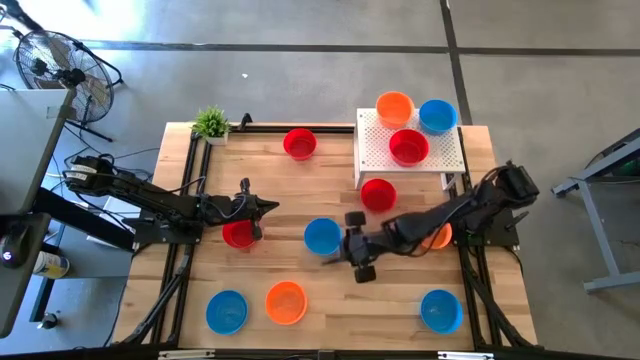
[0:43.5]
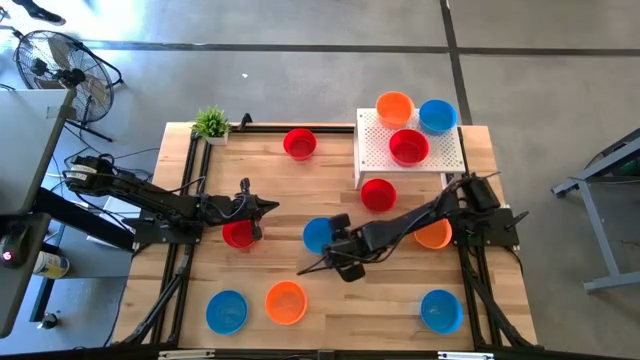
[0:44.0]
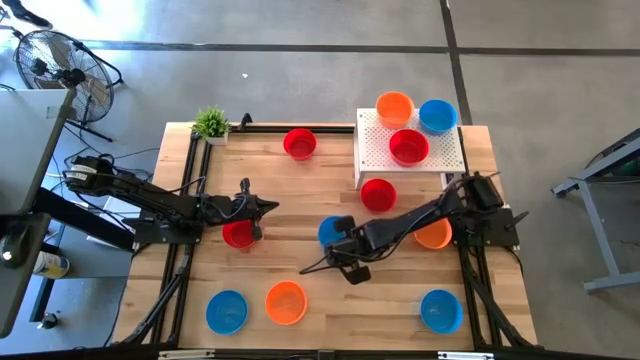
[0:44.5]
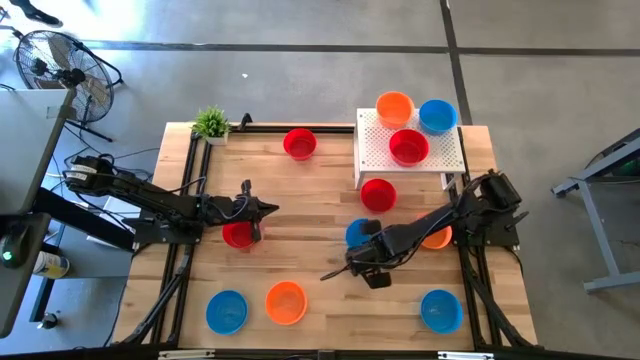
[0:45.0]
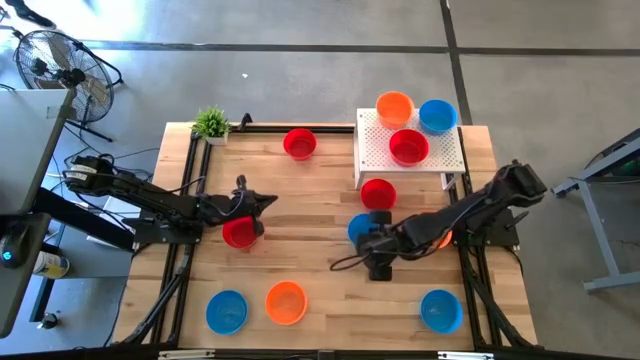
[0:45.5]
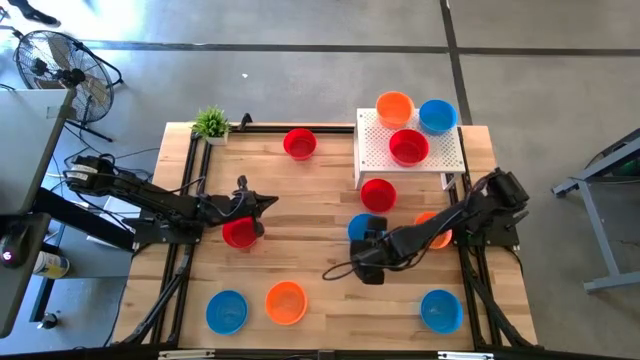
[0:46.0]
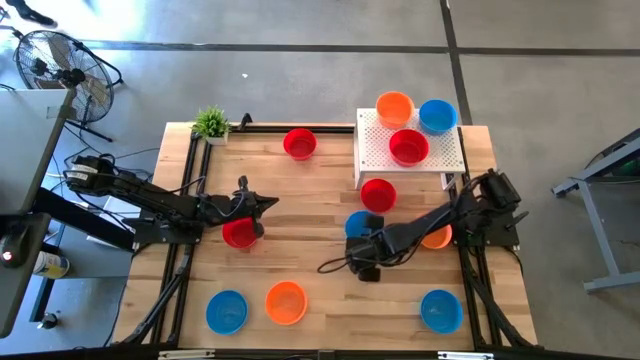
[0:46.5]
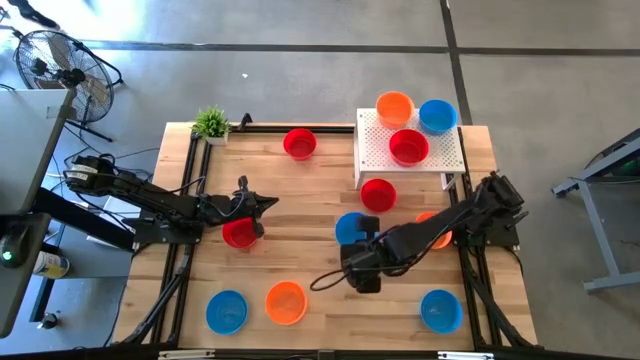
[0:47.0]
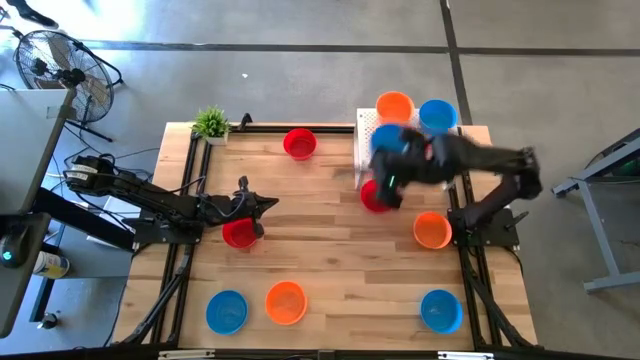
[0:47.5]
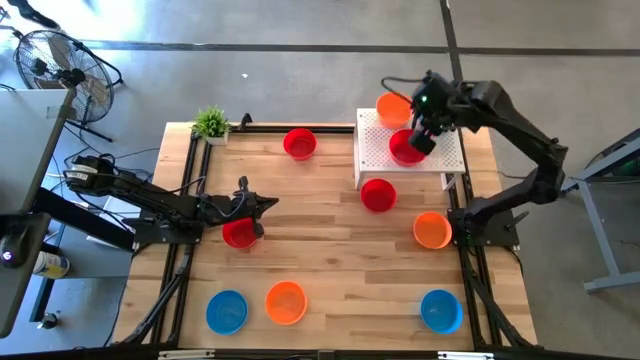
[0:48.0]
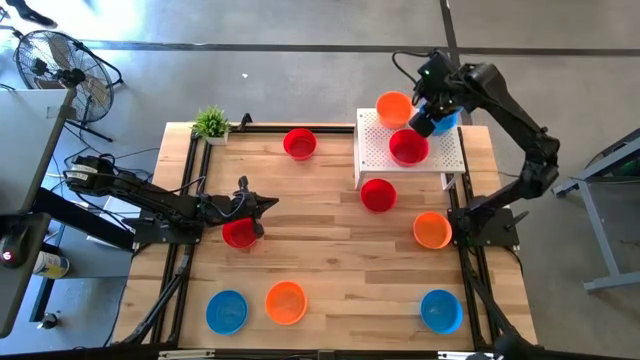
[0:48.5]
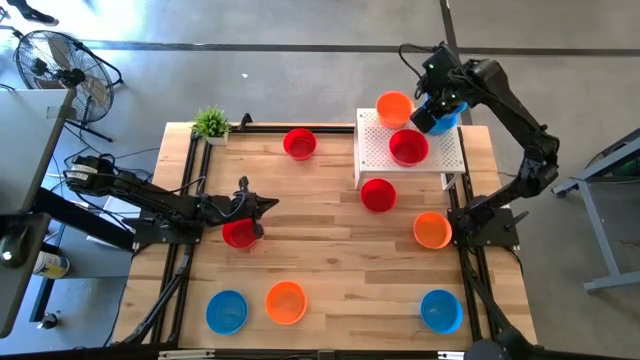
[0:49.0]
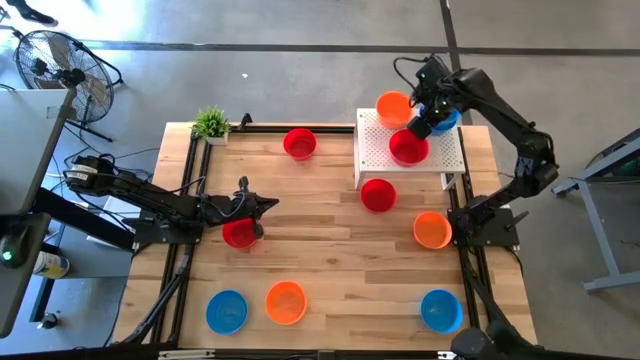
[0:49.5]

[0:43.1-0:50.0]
Task: Pick & Place Mini bowls
Stack the blue bowl on top of the blue bowl on the shelf

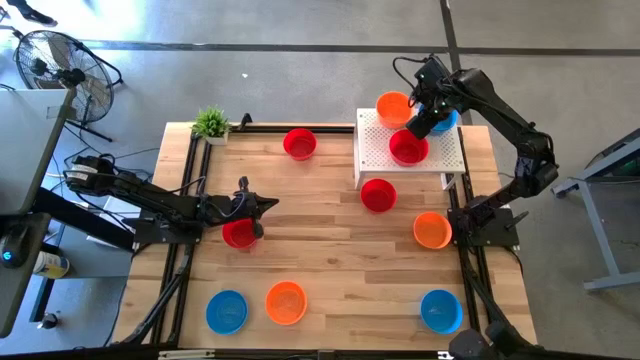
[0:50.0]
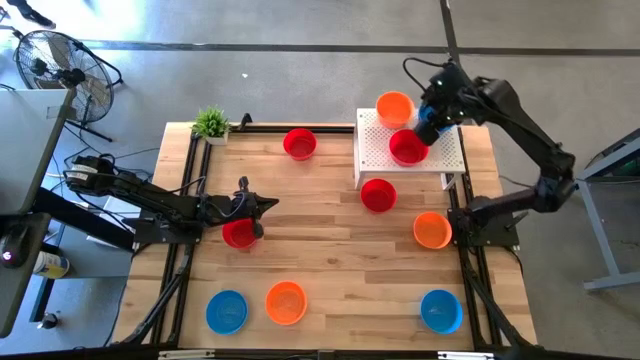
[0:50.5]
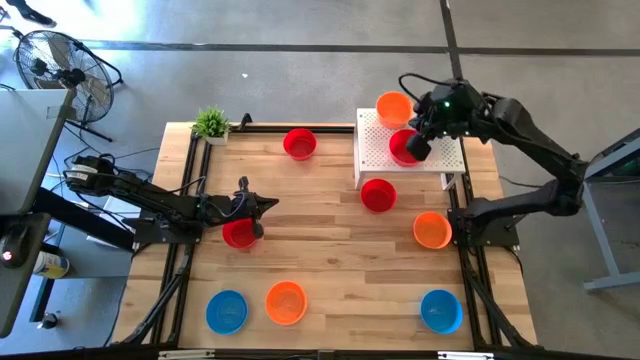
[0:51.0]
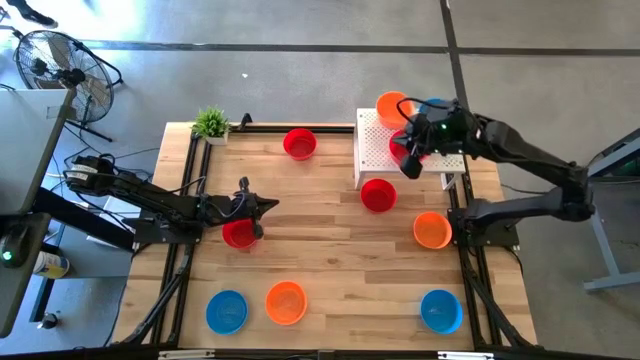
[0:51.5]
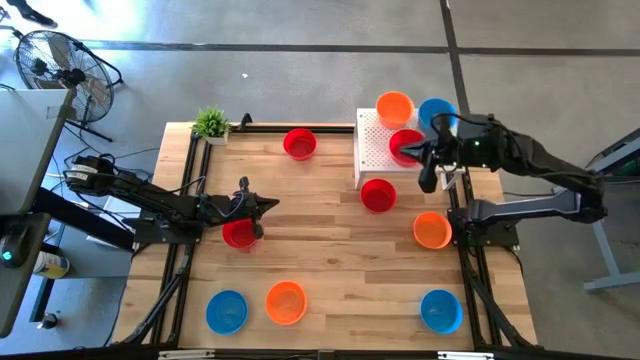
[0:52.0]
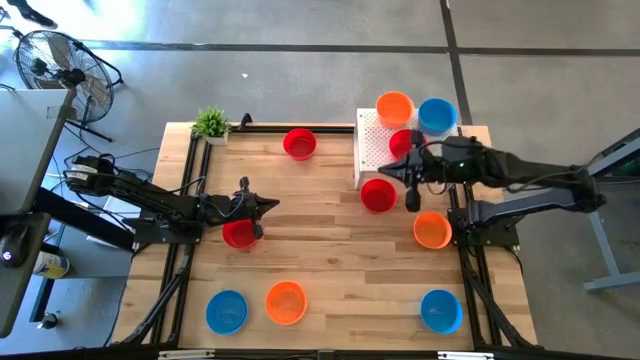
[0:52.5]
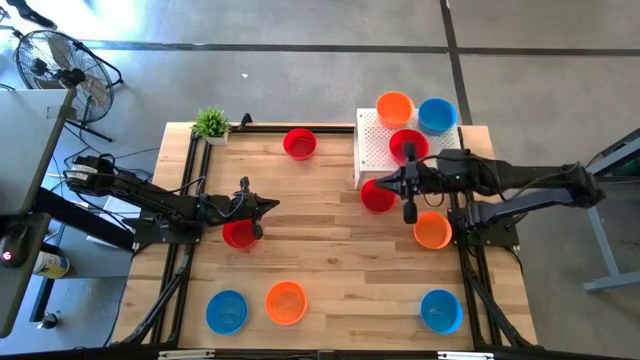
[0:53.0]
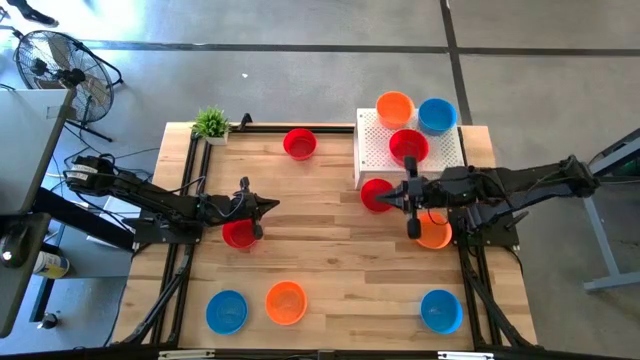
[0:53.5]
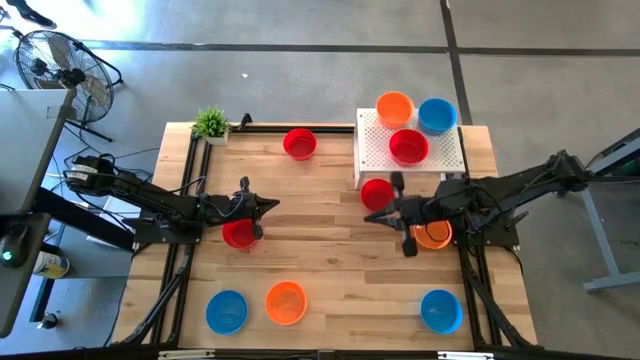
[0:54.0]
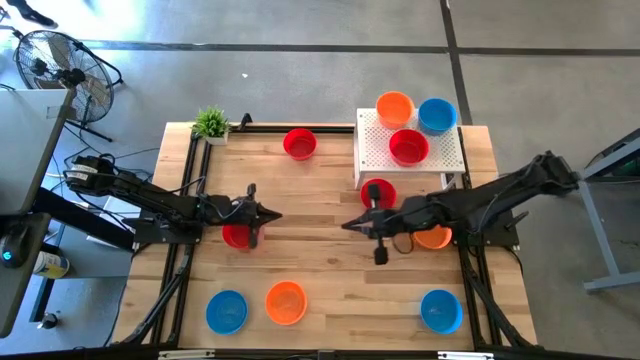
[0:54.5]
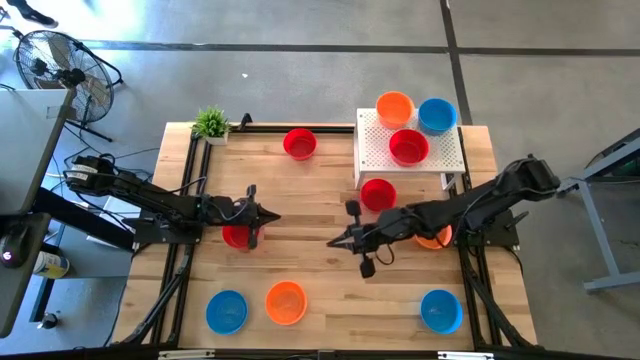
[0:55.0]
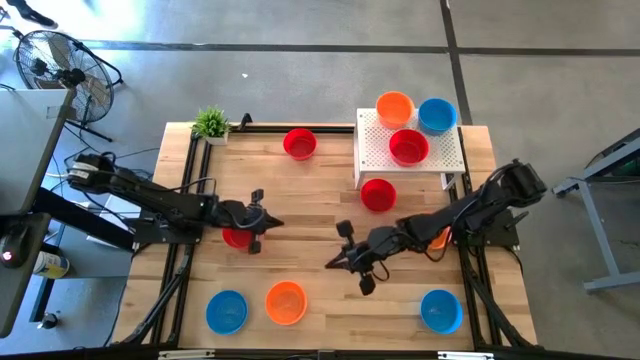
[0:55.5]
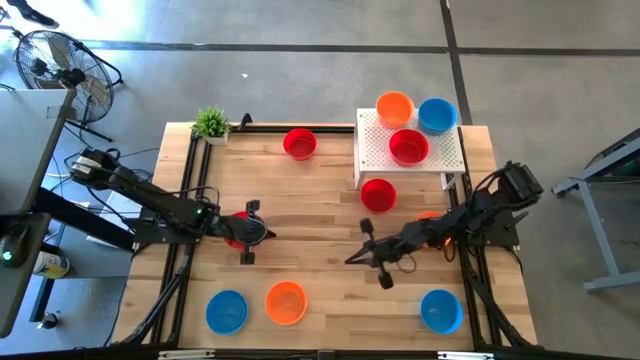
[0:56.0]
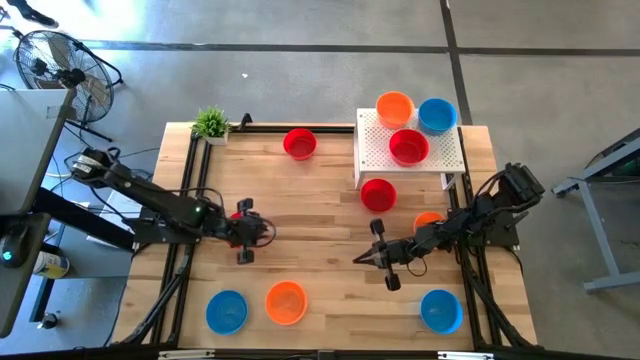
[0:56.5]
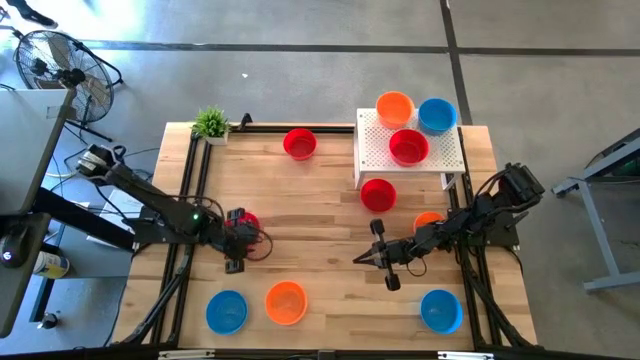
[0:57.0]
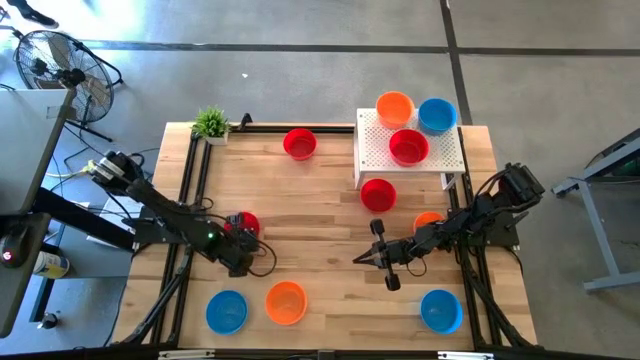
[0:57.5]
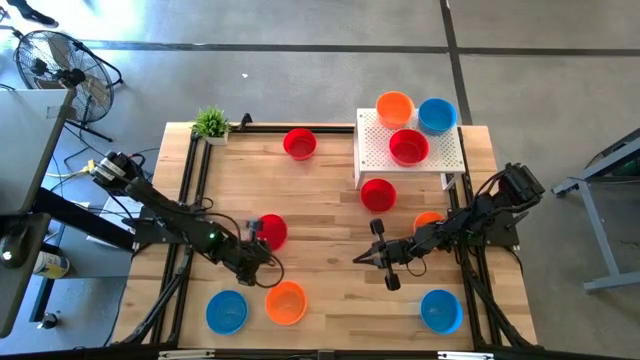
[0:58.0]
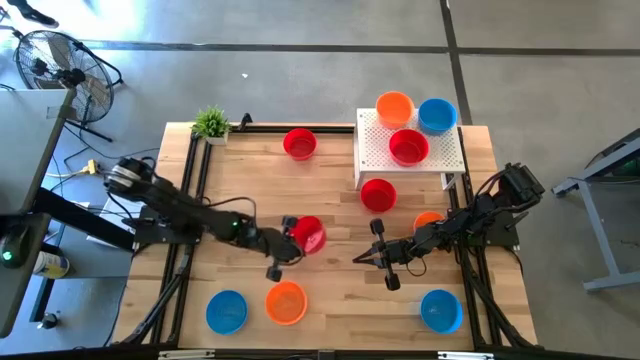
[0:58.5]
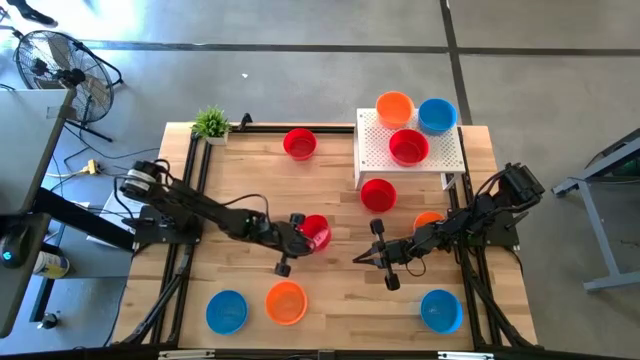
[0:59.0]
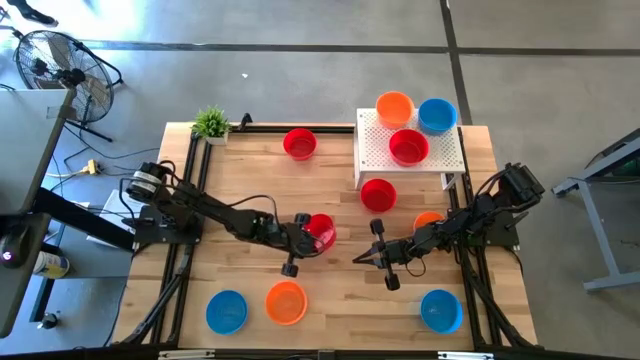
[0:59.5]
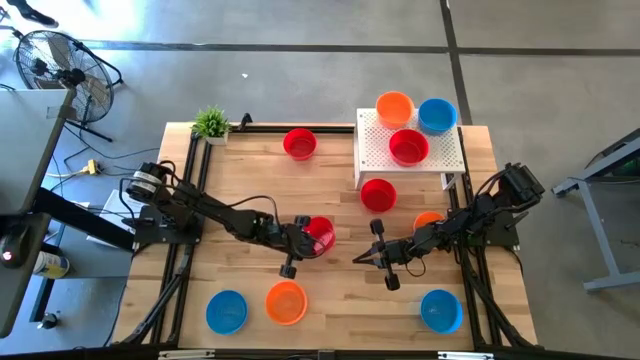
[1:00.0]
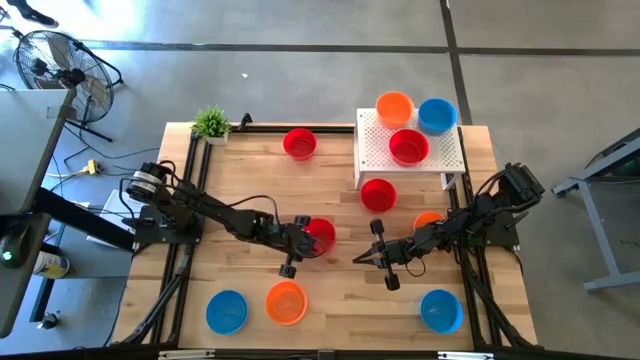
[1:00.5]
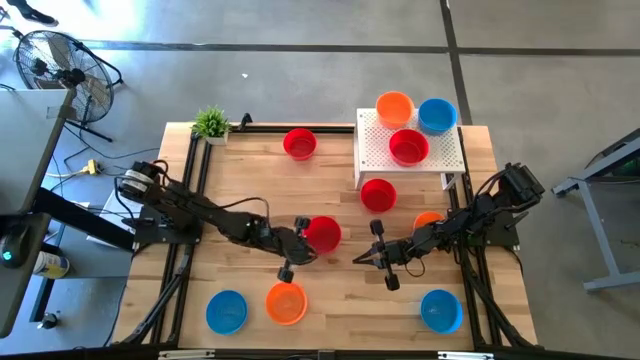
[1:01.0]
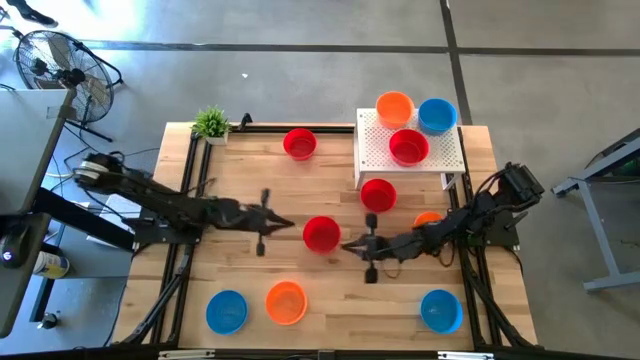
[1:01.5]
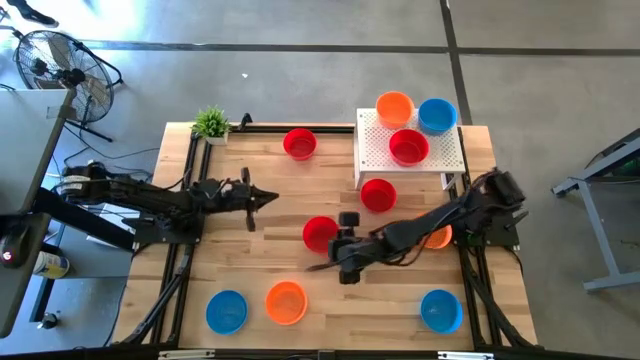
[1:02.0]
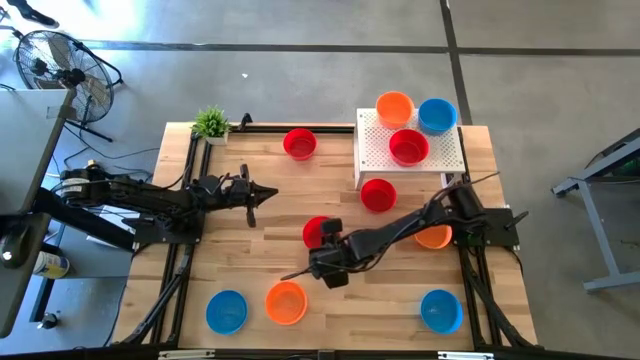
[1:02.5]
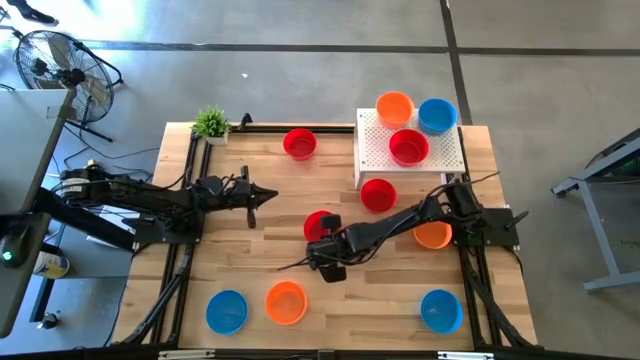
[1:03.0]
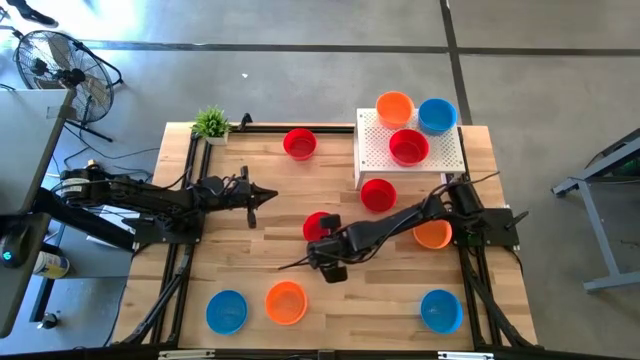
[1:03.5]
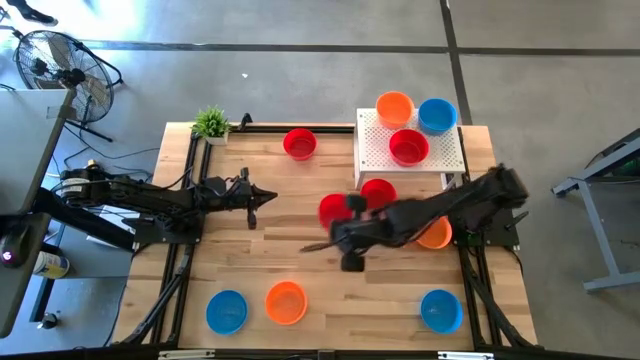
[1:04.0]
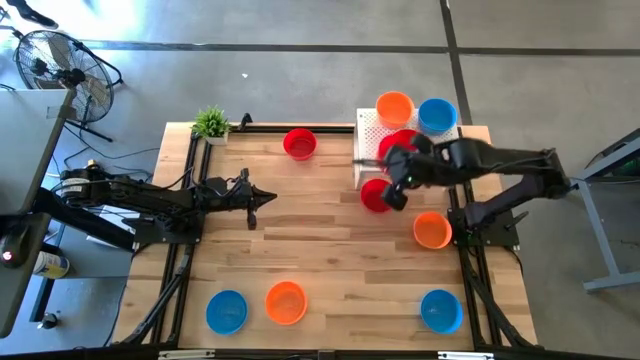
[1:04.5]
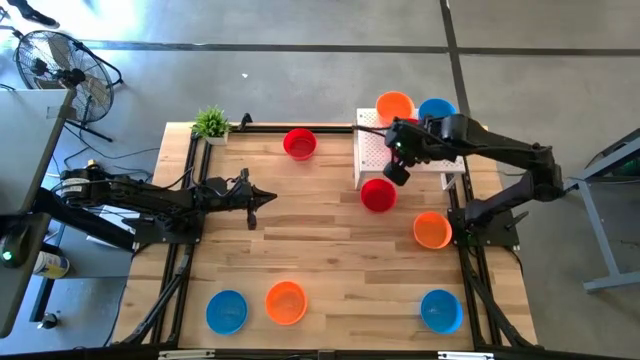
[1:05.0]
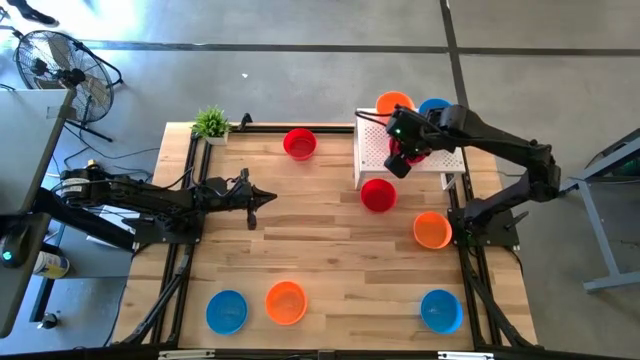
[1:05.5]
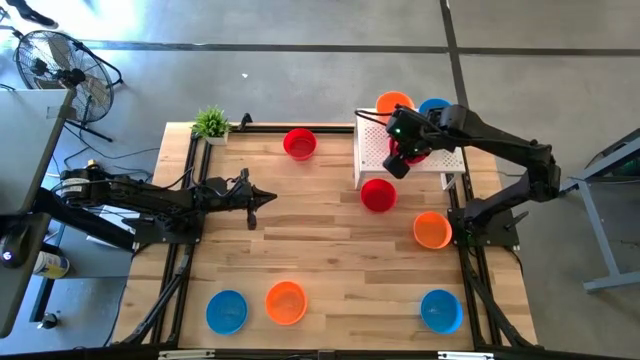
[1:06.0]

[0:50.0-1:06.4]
Stack the red bowl on top of the red bowl on the shelf
